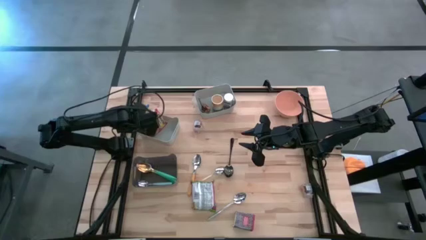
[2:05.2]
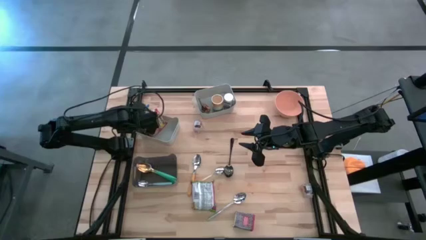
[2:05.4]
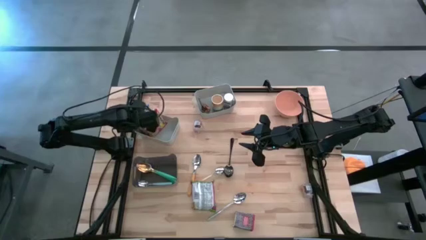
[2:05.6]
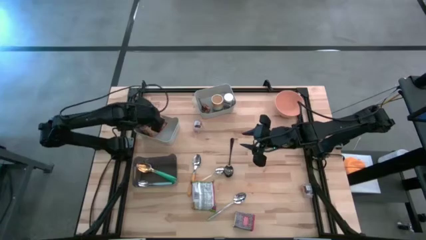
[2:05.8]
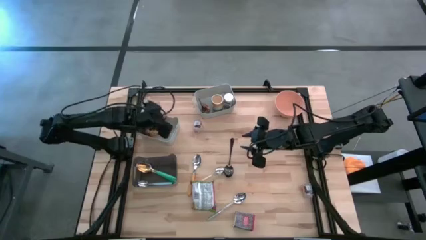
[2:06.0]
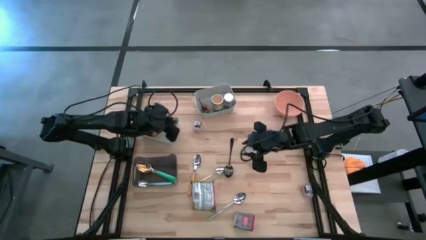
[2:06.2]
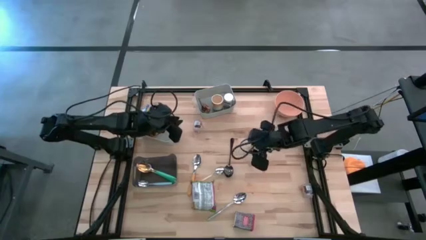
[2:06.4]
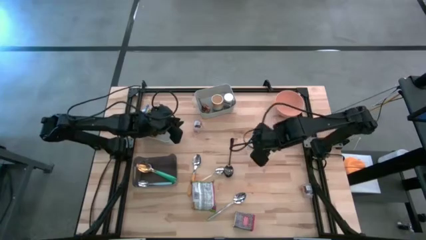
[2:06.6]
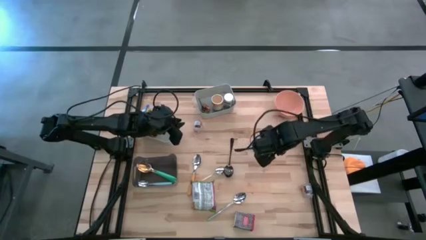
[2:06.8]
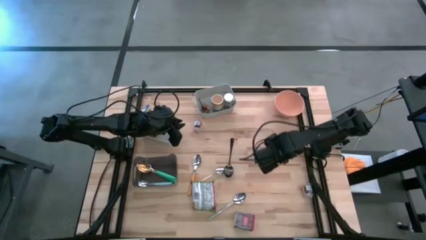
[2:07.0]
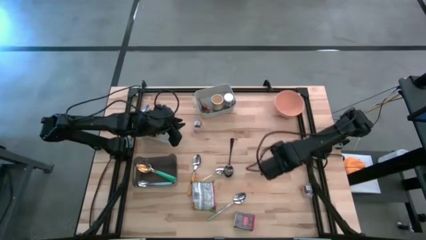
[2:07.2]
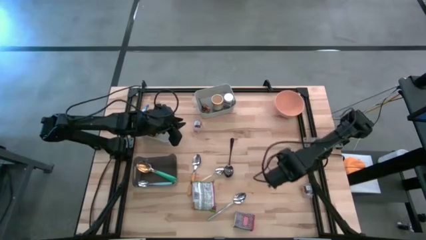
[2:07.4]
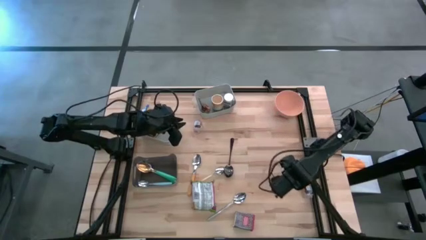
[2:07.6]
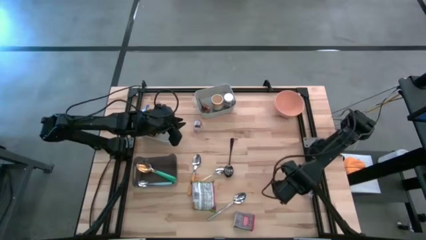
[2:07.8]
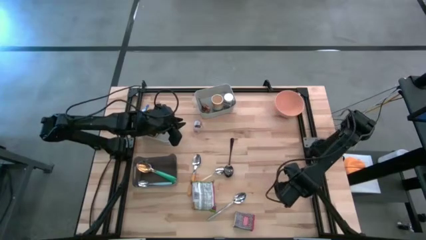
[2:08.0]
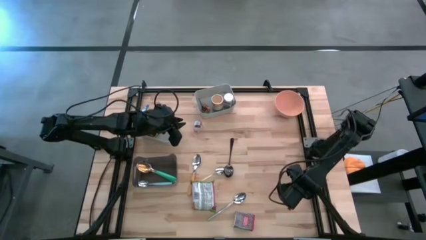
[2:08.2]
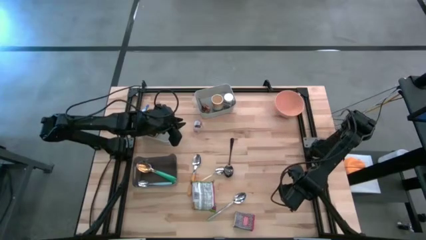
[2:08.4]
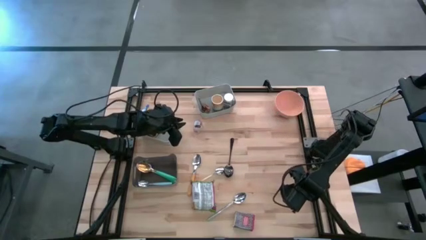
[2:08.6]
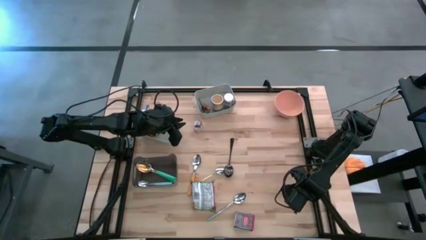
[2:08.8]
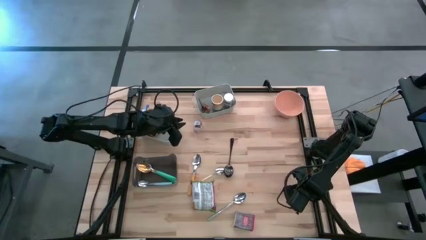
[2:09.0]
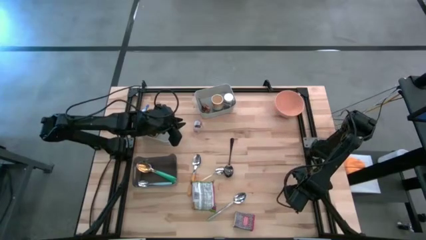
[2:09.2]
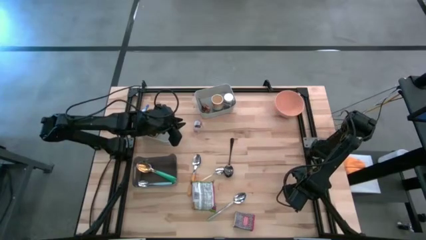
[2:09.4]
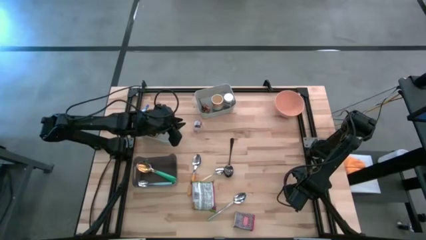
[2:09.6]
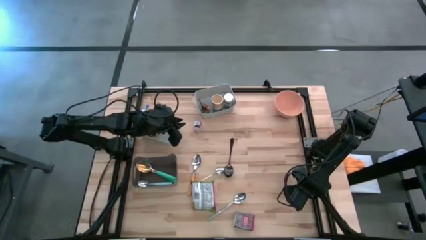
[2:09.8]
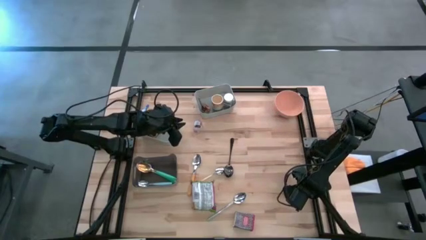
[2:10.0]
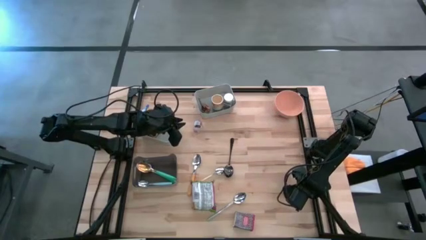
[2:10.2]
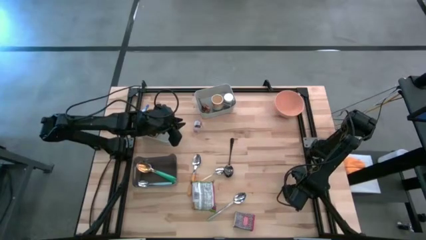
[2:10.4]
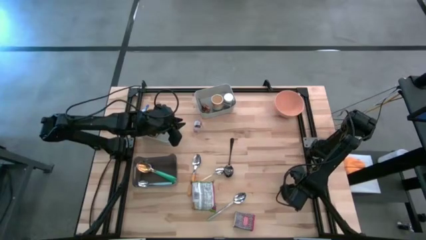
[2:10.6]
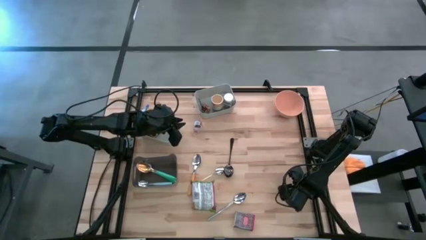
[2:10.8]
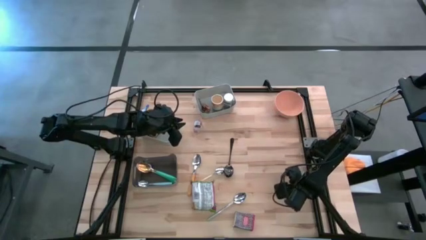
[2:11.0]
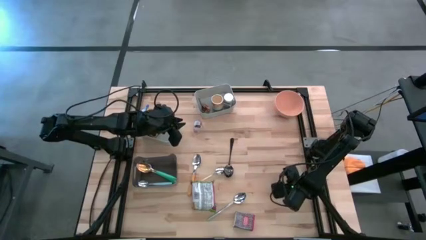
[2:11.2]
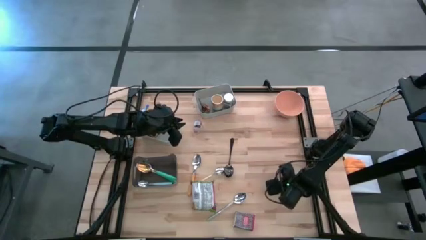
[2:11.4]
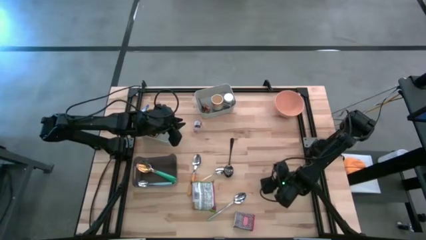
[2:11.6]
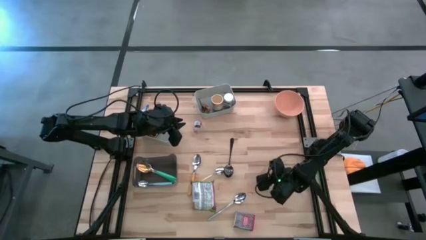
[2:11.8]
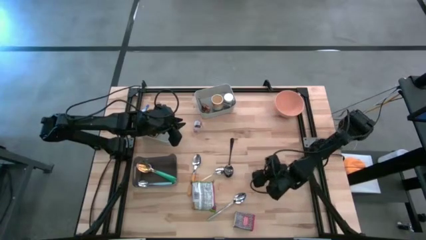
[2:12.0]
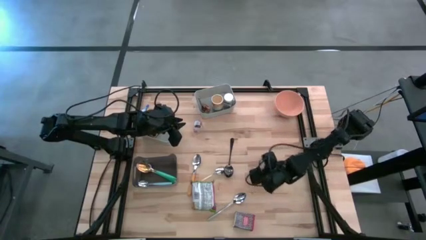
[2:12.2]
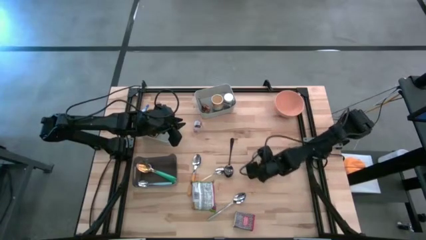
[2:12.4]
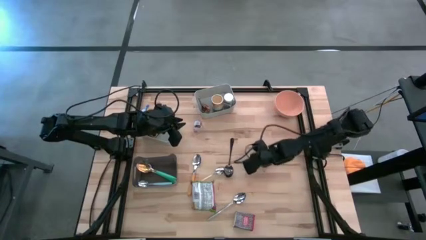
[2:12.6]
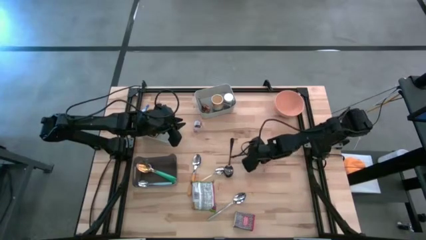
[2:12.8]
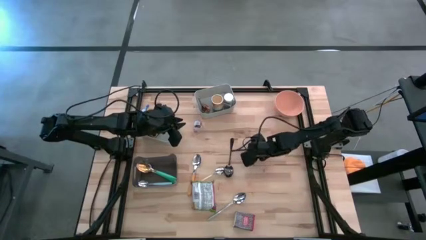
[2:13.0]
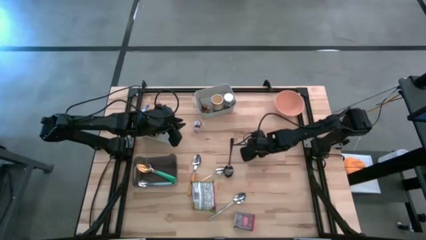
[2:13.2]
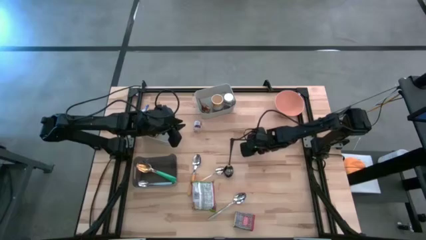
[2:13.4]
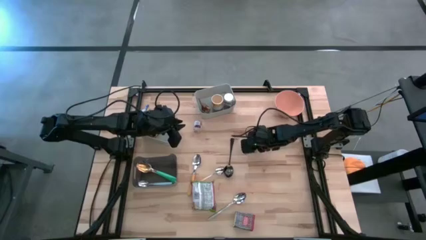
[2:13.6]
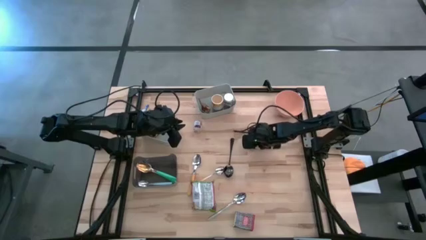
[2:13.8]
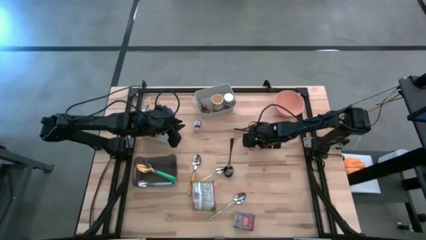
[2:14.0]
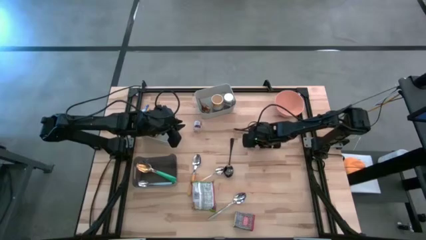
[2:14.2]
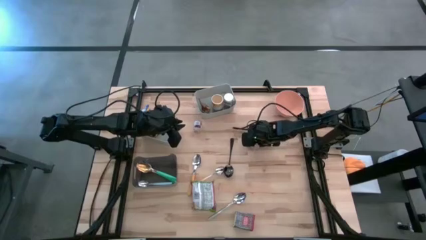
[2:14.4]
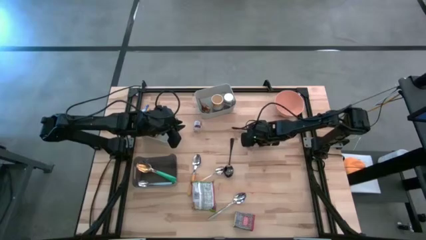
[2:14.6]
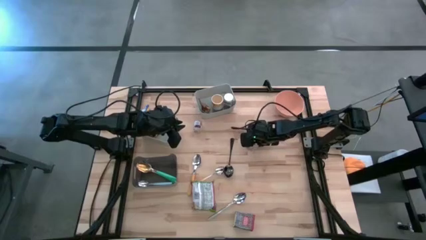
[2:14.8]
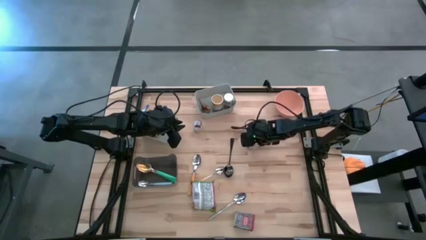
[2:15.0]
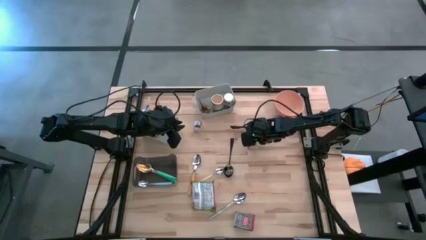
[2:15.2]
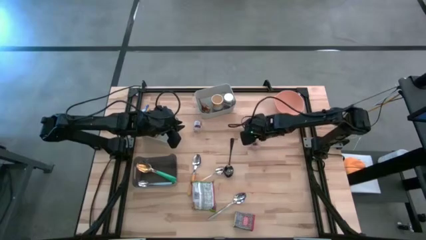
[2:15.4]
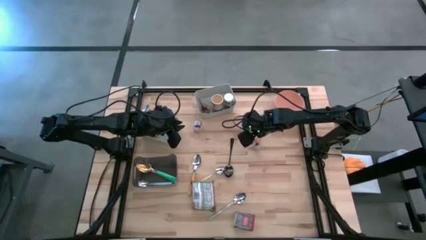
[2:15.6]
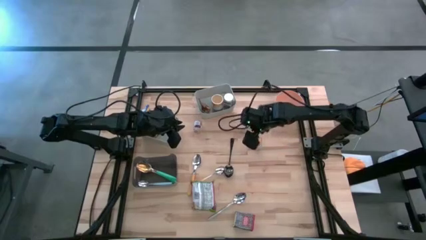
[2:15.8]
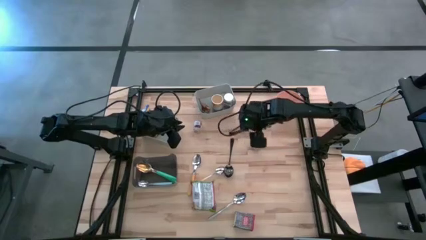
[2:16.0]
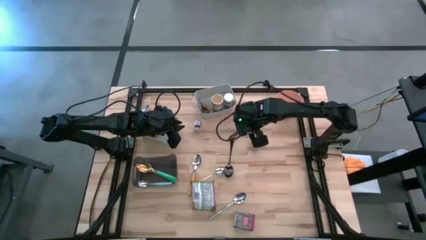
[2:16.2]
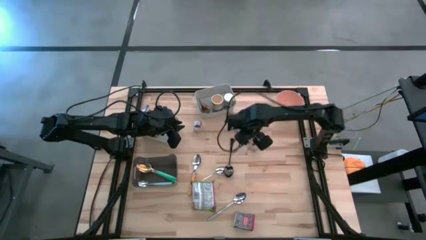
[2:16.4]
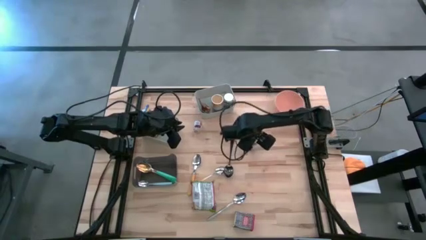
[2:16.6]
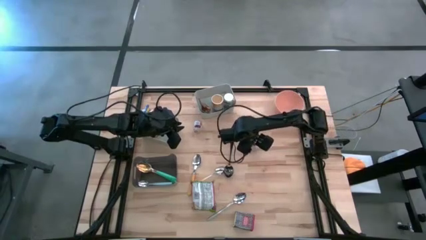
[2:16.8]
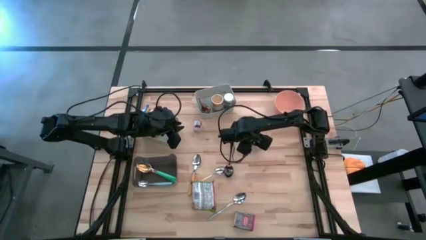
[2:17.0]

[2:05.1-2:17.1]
Put the right brown spice bottle into the top gray bin
